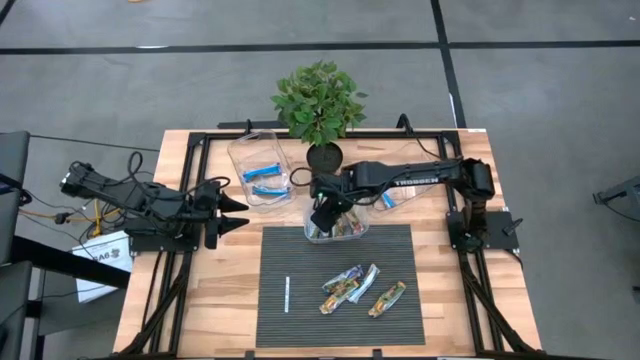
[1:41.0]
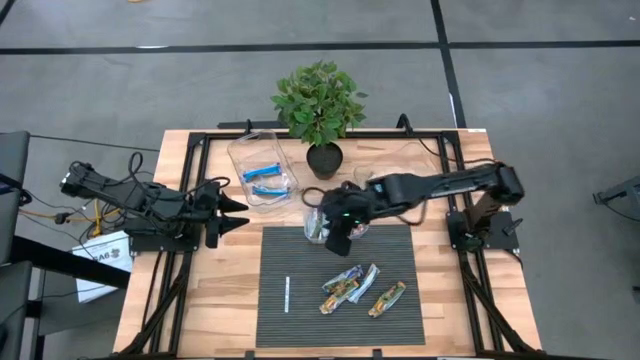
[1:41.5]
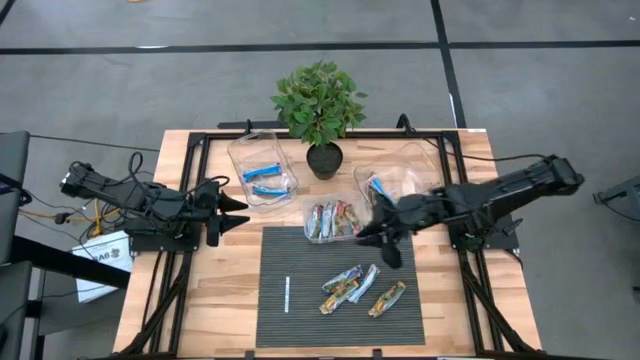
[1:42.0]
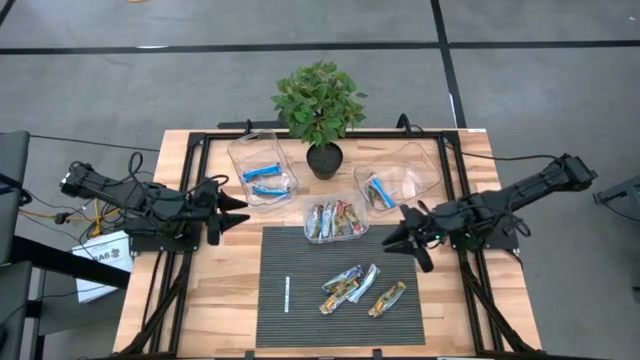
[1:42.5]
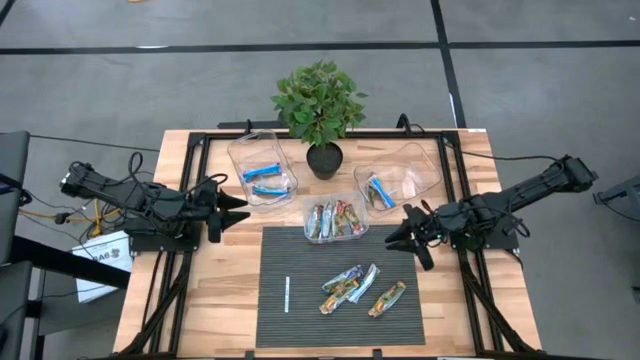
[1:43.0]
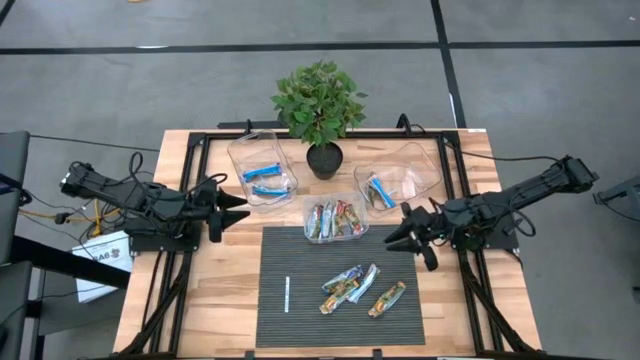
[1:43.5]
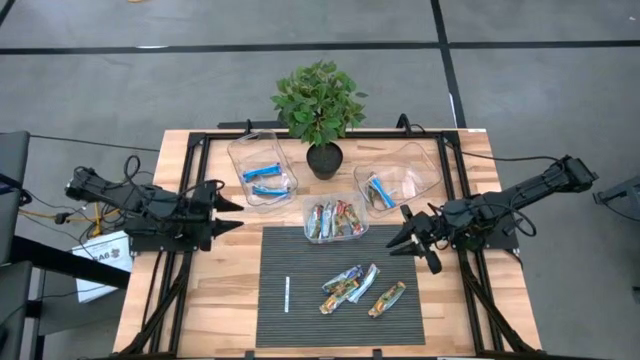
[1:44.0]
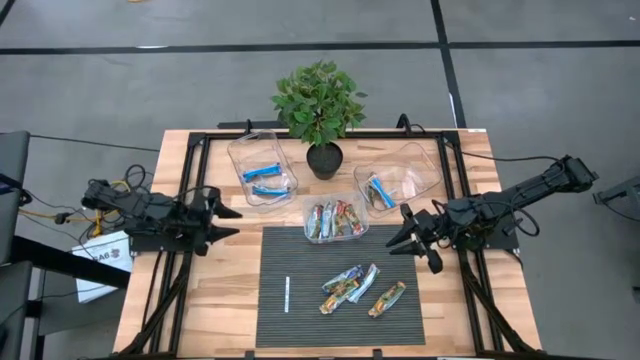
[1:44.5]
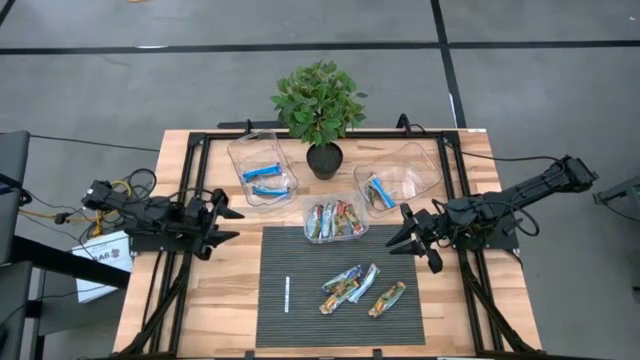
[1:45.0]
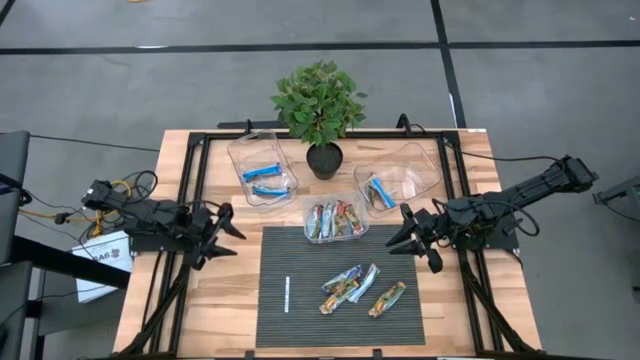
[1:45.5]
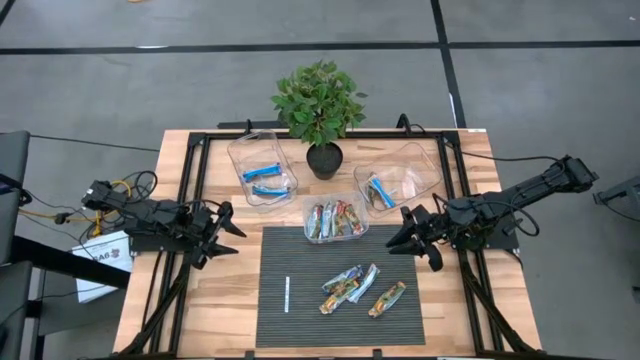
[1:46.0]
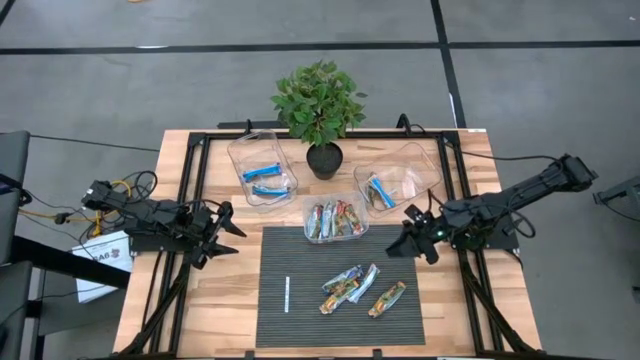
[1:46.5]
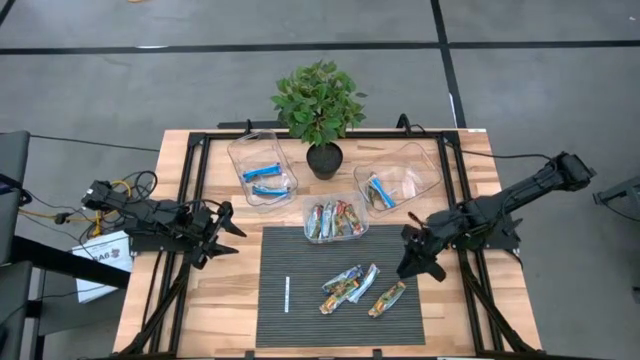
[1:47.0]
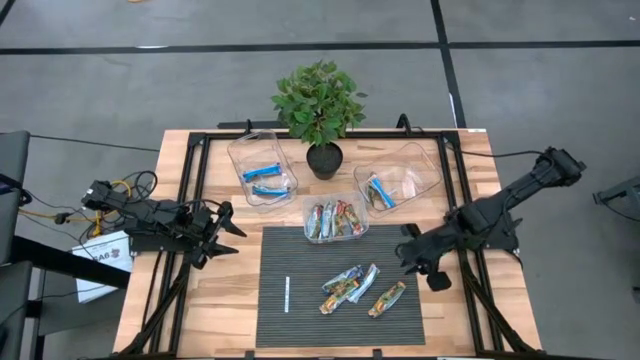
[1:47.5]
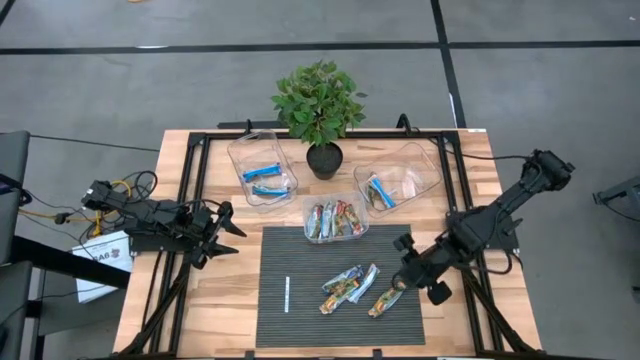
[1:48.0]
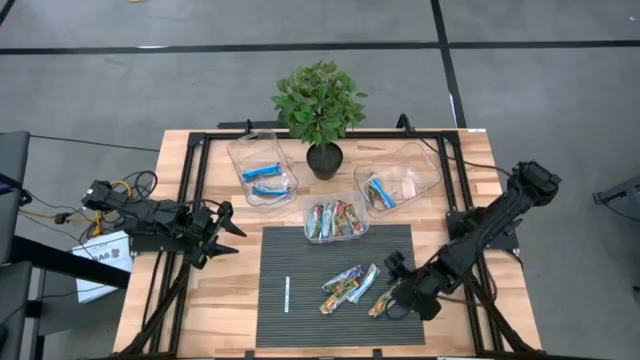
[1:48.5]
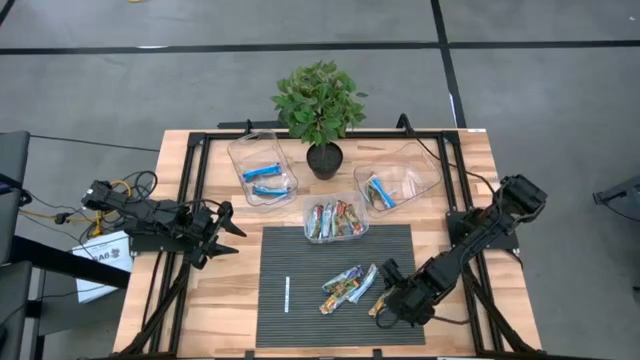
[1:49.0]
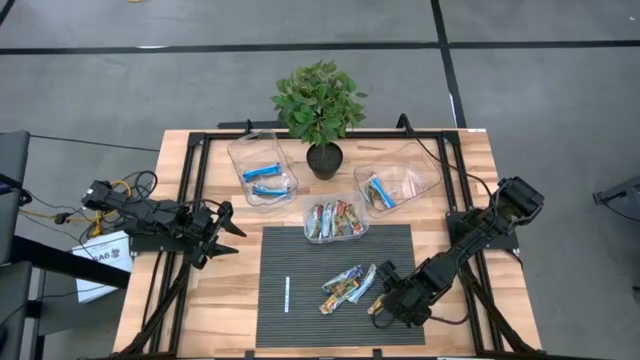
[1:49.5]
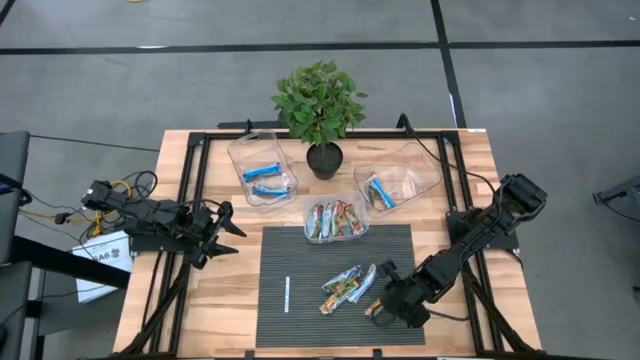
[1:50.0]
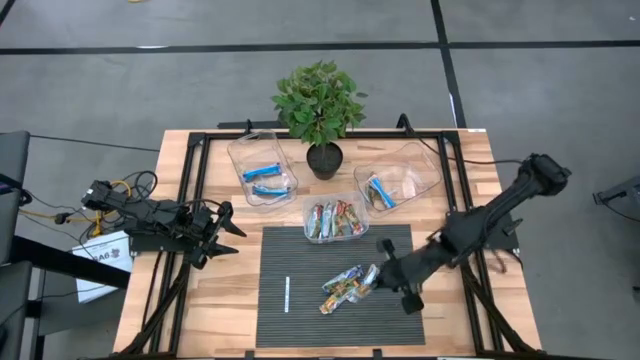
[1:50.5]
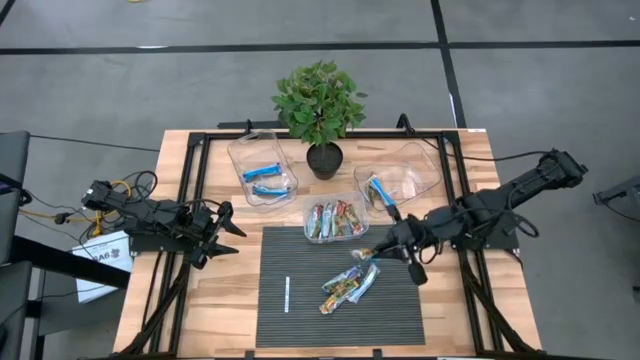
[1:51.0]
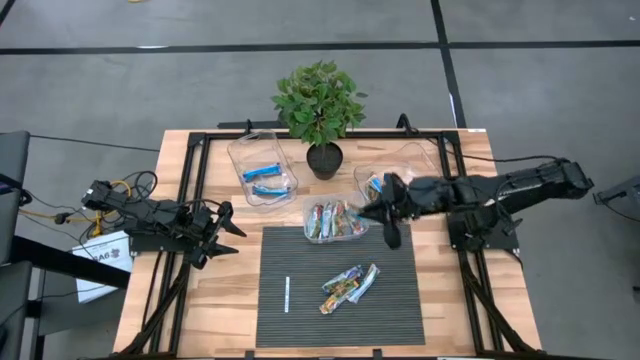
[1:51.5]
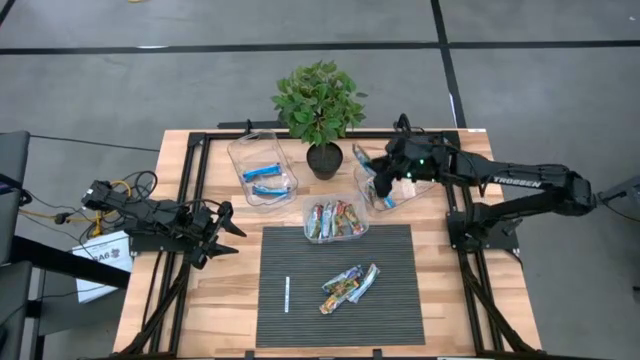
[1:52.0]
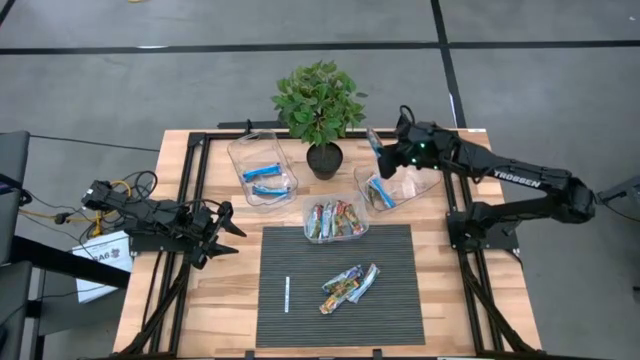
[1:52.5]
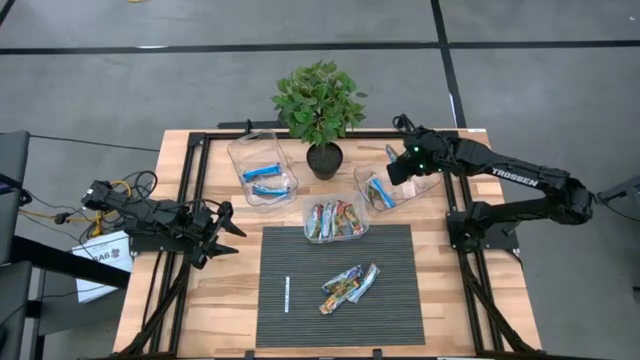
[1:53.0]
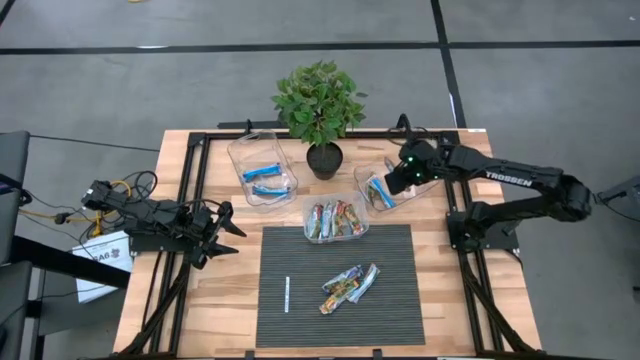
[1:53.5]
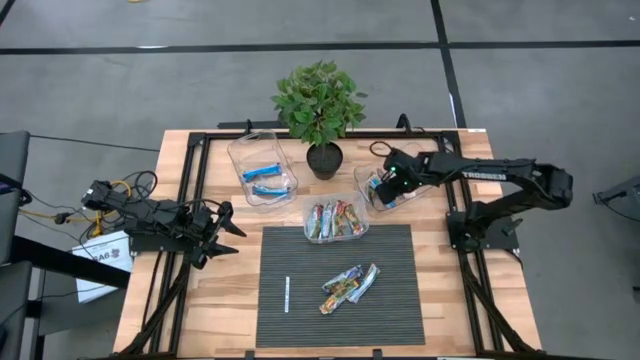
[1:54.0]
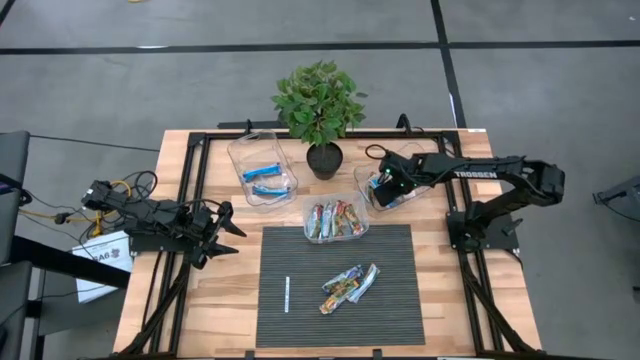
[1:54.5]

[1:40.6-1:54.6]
Task: Pick and place Granola Bars by type
Put the yellow granola bar into the right transparent bin

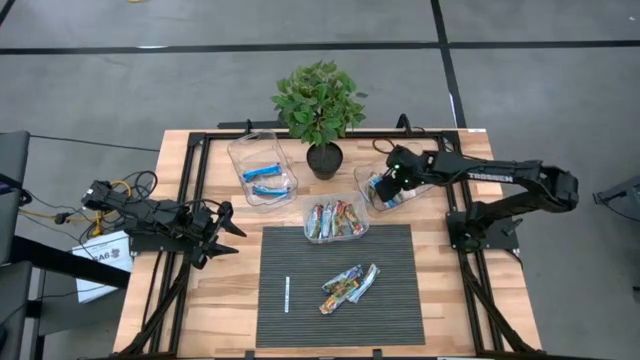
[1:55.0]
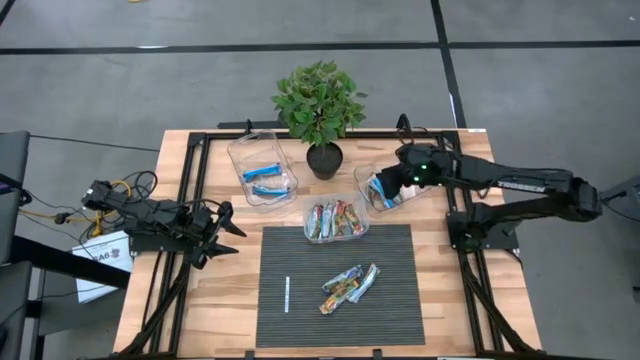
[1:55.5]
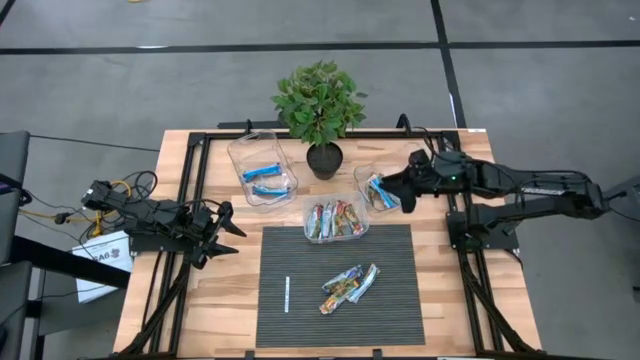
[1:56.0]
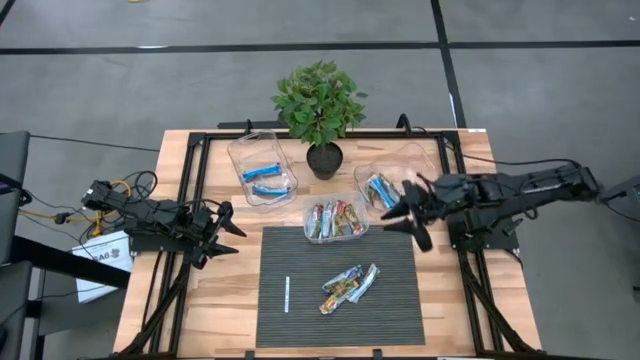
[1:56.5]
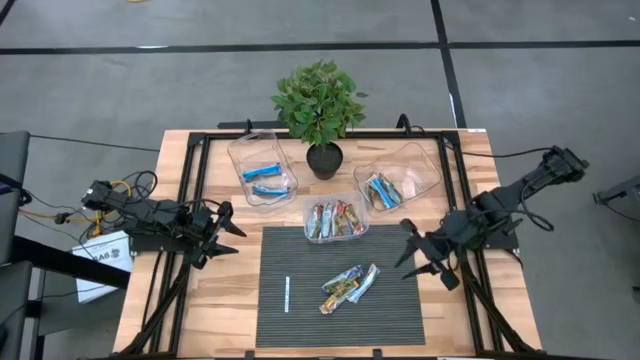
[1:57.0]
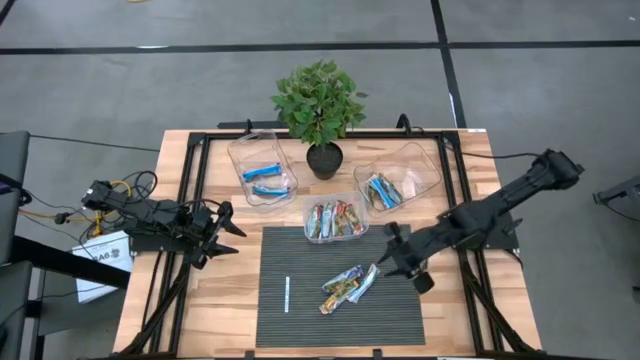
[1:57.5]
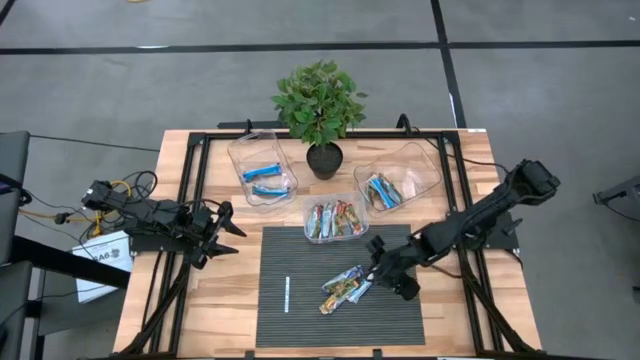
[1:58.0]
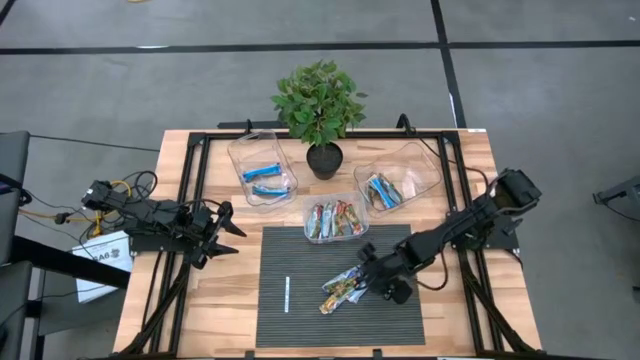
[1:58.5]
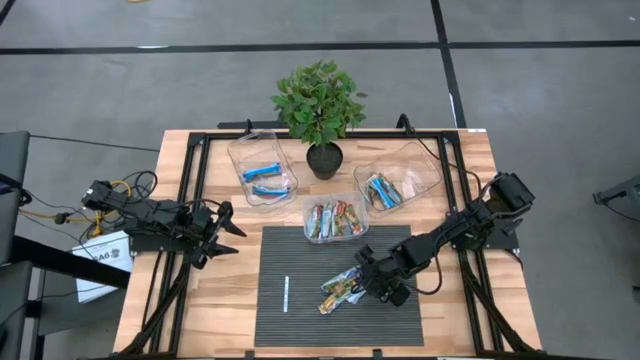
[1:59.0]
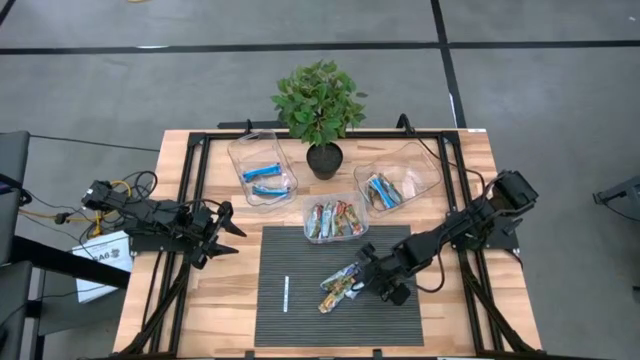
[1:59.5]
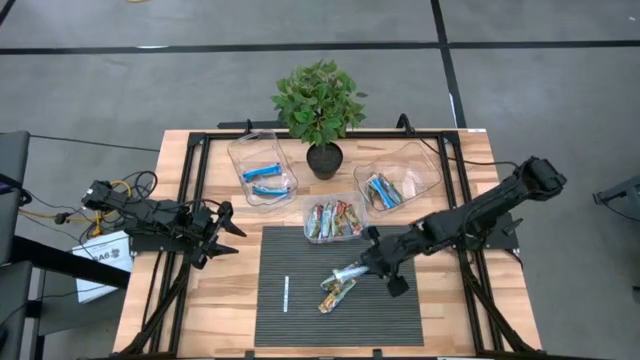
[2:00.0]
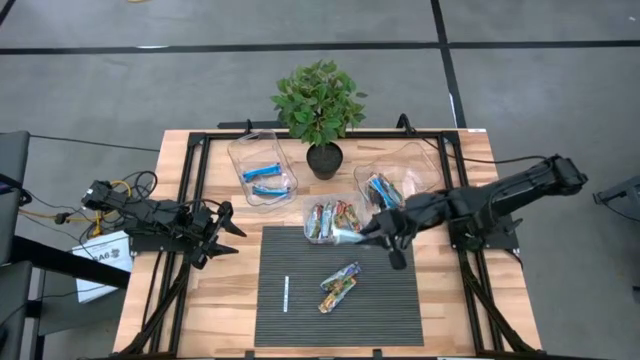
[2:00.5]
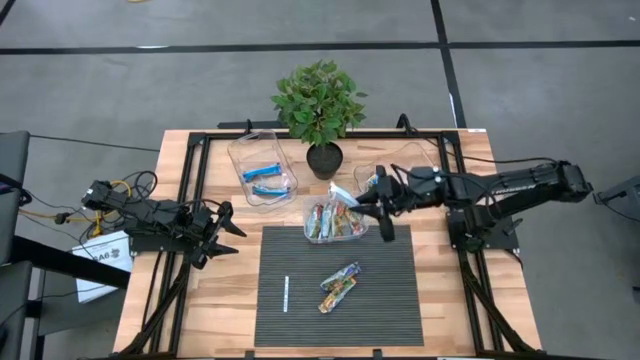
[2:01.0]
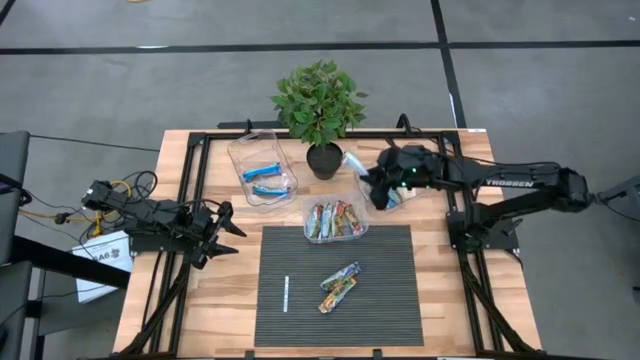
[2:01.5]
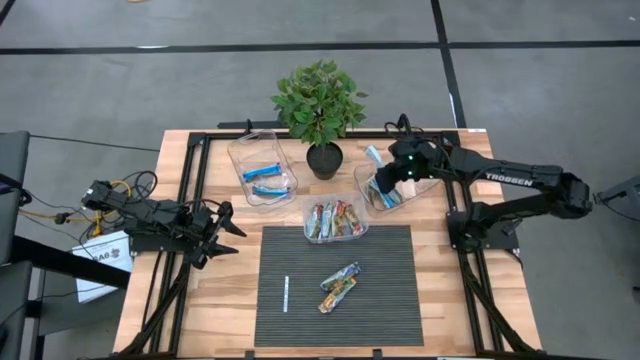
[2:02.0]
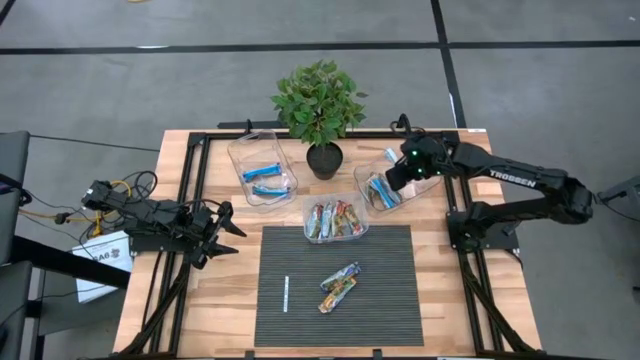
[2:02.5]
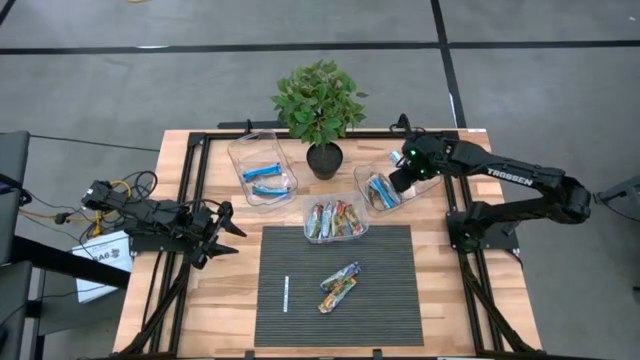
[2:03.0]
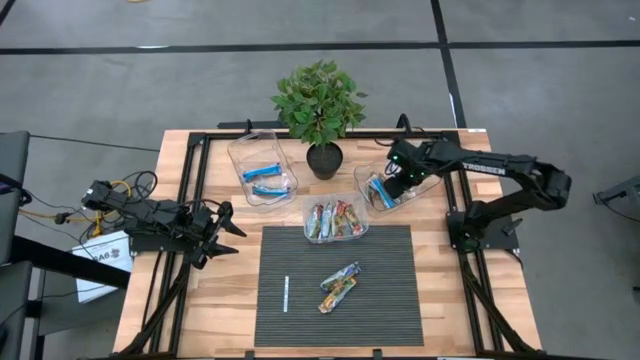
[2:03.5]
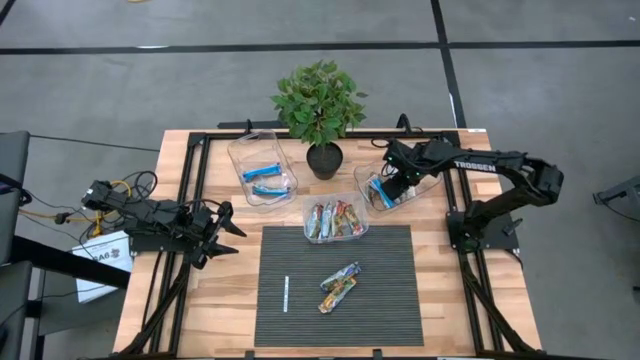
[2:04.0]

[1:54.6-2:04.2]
Put the yellow granola bar into the right transparent bin
